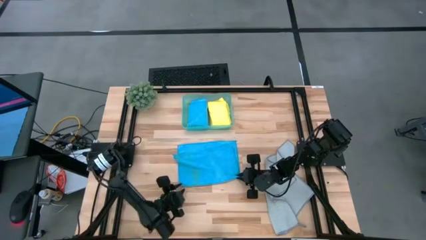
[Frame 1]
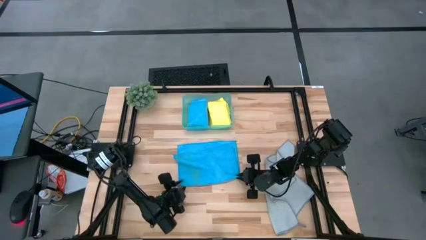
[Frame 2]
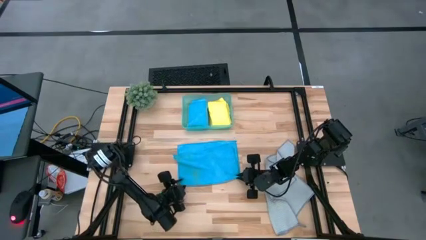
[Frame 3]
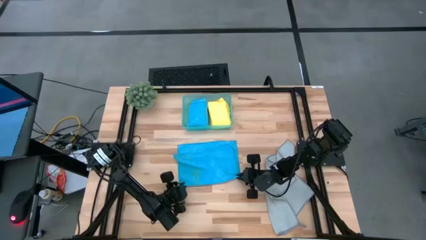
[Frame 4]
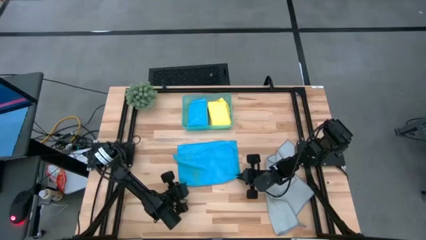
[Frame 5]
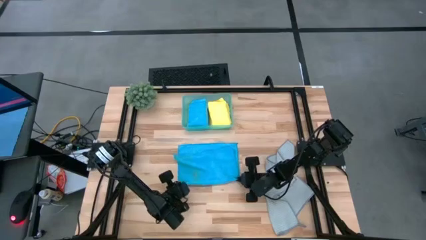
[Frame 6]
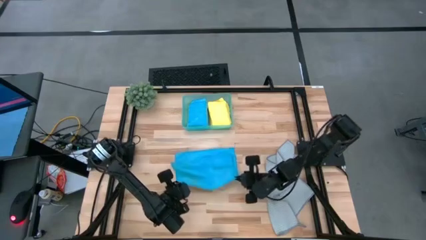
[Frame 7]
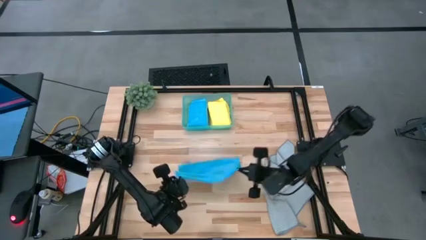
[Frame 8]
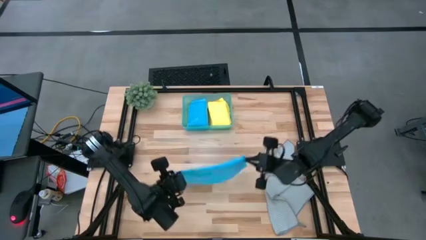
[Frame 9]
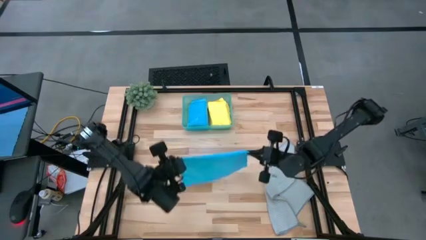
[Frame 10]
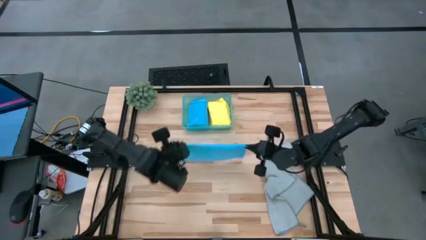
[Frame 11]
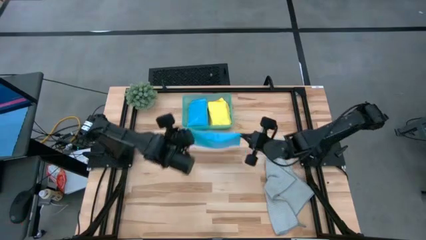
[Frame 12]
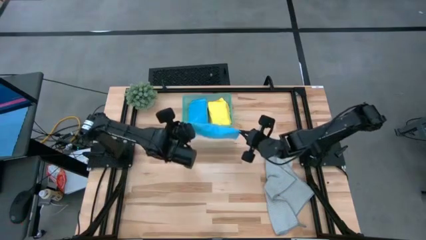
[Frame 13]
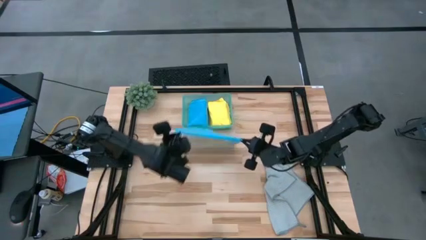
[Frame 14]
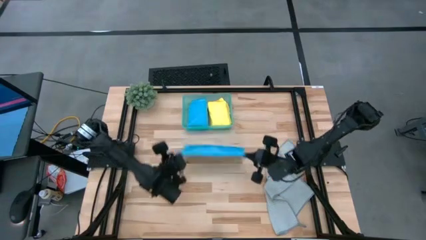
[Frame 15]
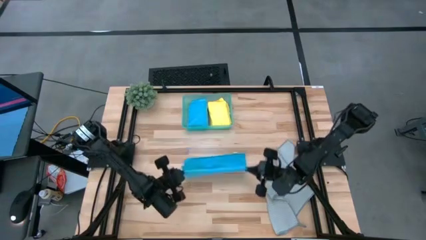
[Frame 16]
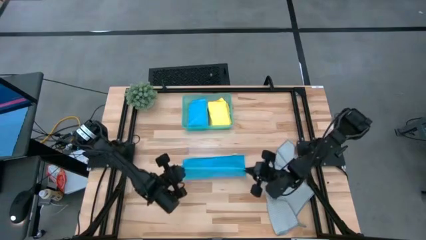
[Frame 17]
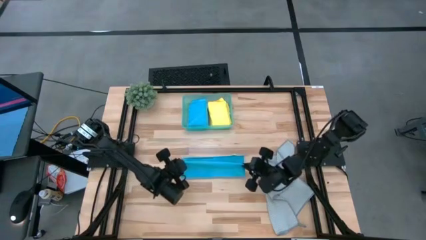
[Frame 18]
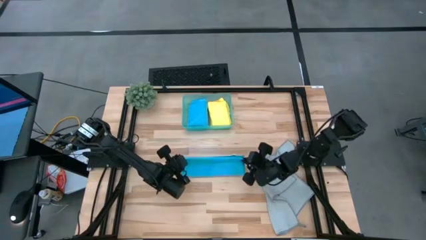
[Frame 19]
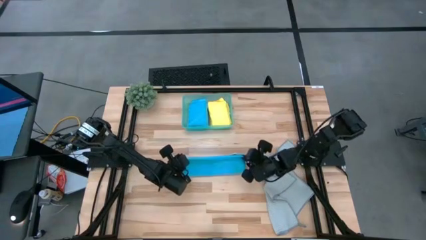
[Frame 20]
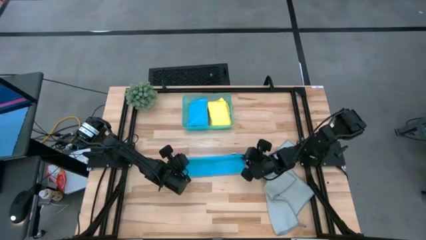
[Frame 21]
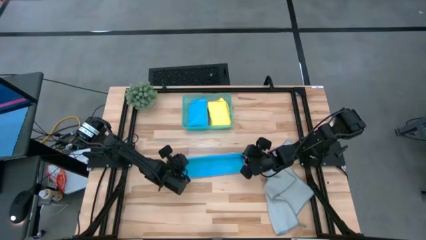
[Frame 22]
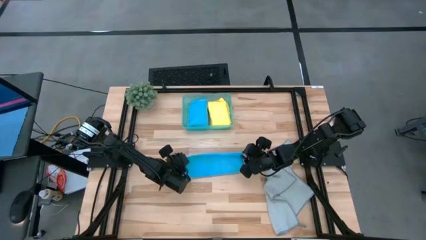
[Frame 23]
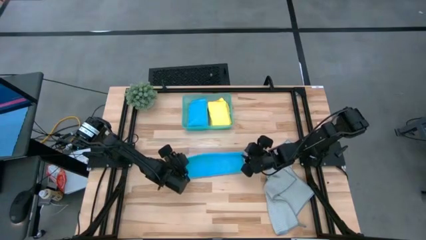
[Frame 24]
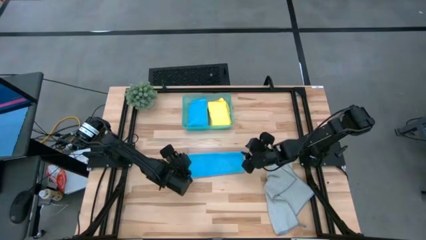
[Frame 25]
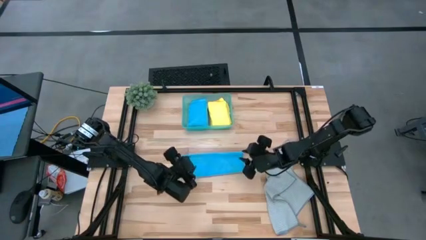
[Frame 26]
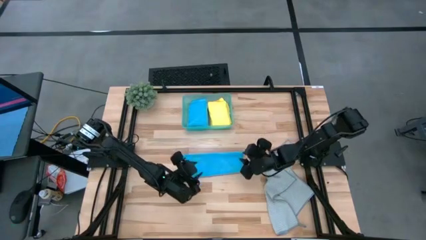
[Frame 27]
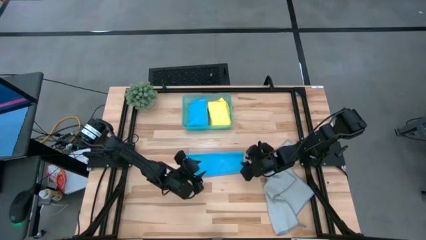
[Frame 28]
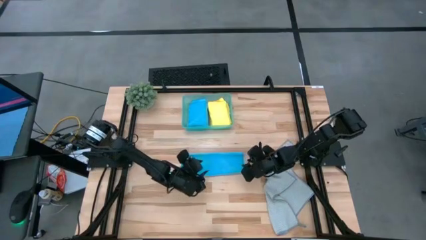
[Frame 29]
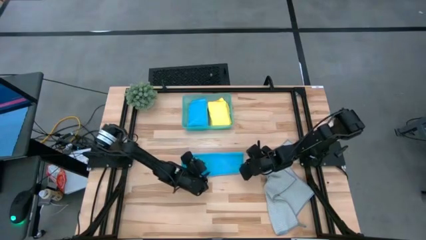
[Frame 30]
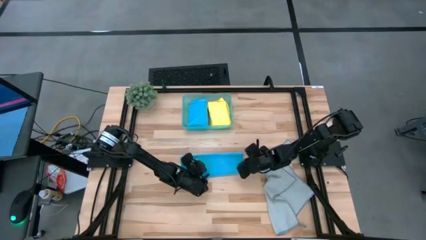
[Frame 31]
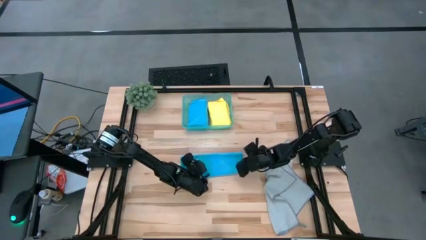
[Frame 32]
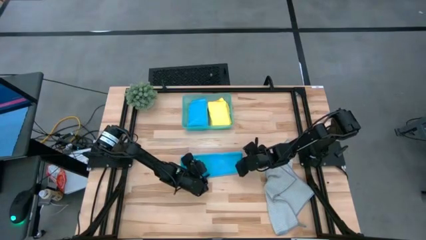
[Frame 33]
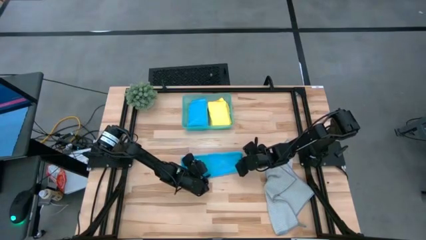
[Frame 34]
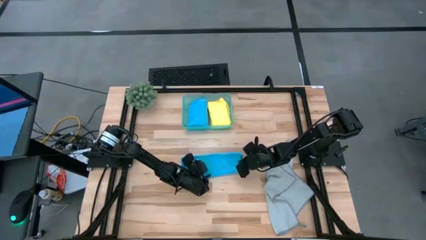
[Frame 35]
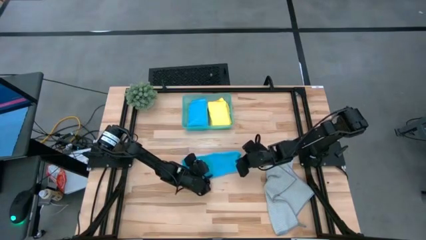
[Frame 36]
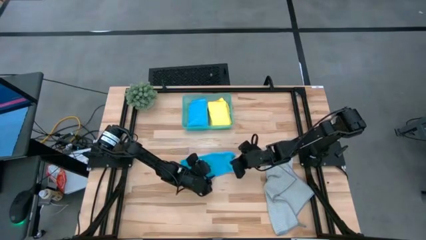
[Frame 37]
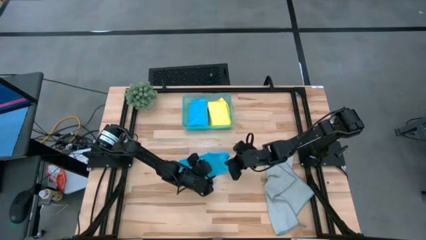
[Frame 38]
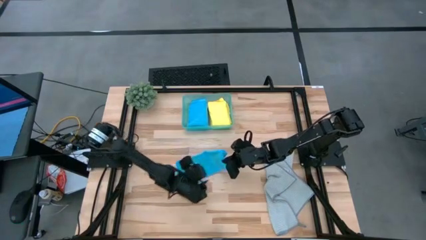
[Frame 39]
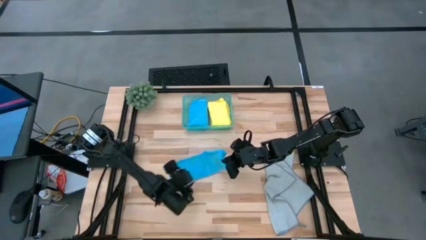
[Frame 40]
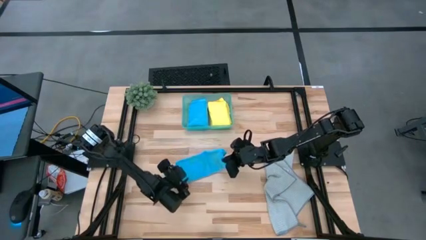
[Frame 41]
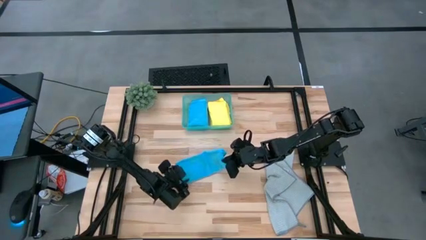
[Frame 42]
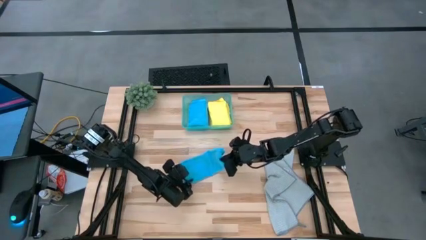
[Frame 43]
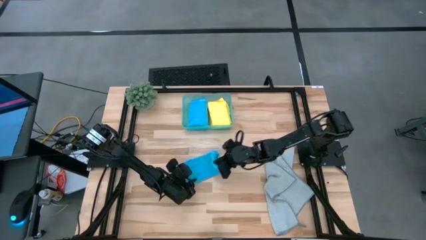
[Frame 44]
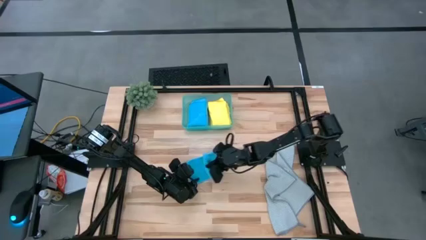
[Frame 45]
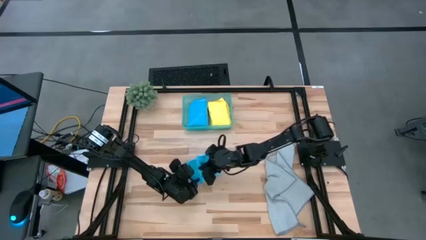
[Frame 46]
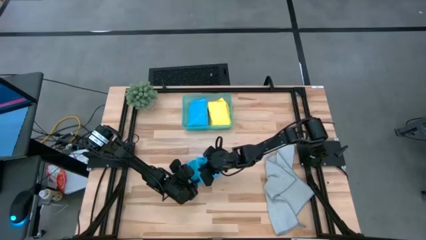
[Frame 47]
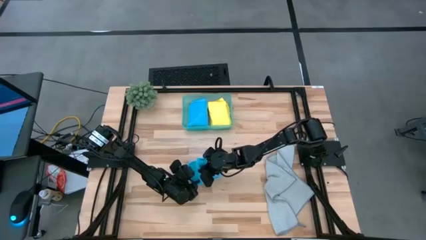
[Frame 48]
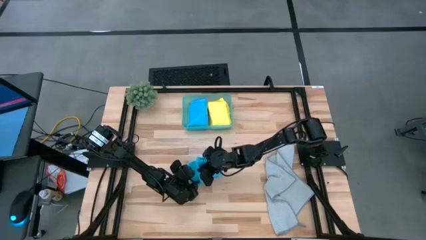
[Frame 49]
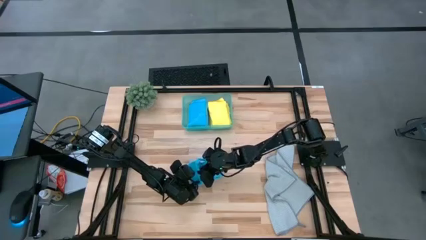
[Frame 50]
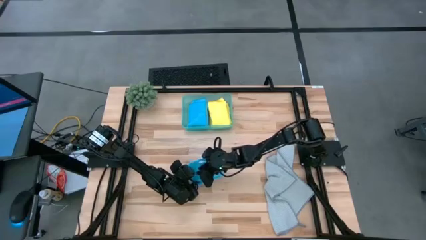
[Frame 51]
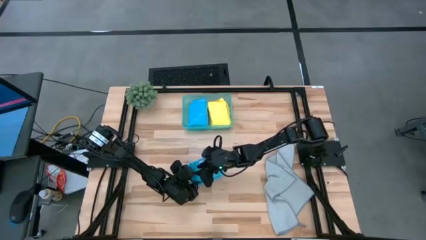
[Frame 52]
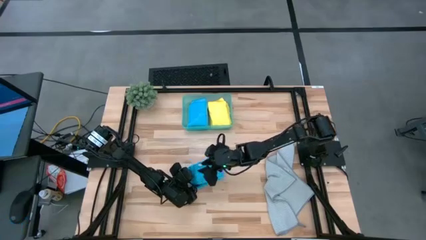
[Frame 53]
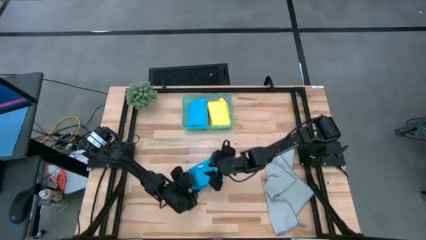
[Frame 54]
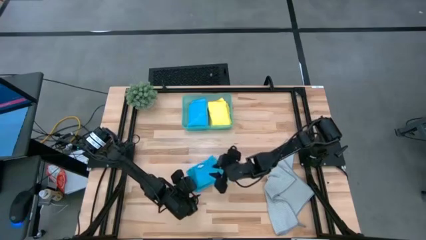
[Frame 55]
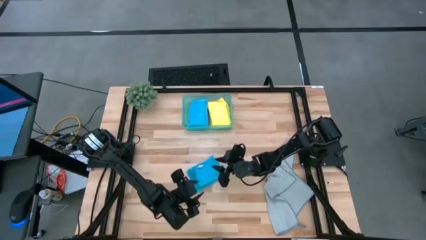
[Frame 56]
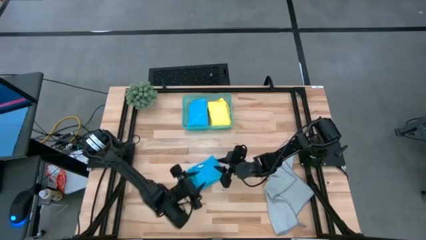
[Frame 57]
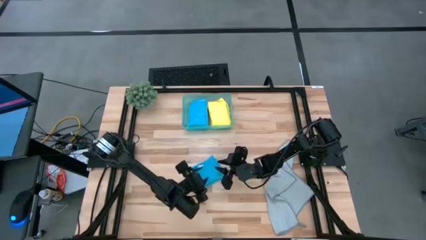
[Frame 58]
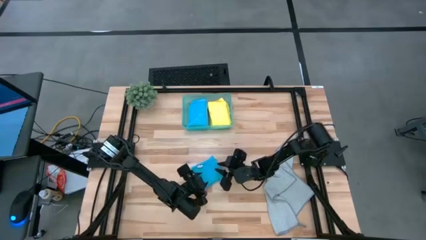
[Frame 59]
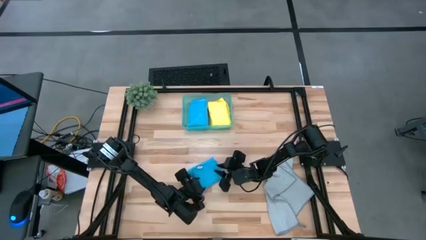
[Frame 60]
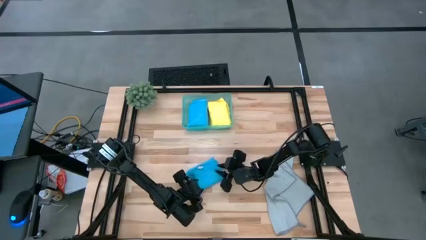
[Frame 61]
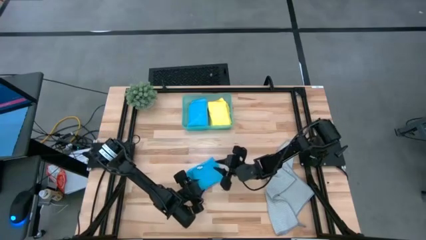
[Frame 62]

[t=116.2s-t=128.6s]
Task: Fold microfiber towels
Fold the blue microfiber towel

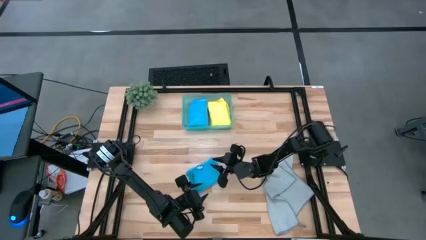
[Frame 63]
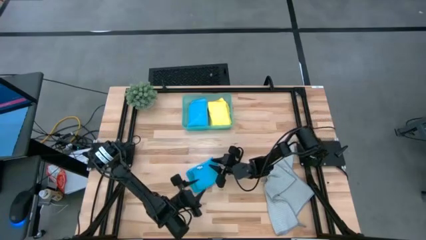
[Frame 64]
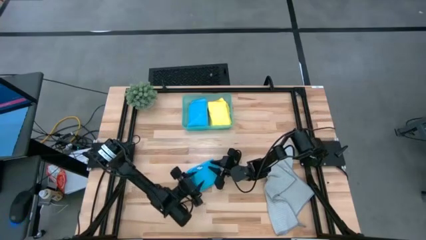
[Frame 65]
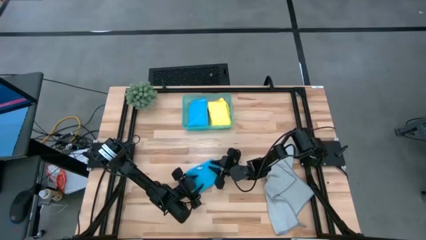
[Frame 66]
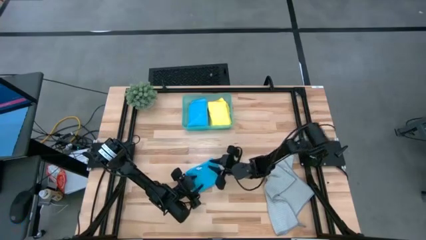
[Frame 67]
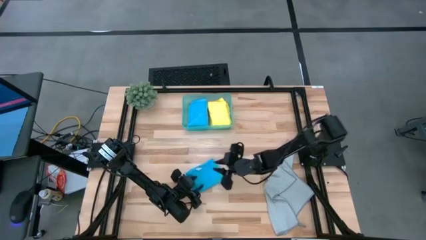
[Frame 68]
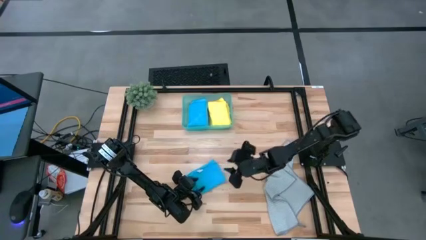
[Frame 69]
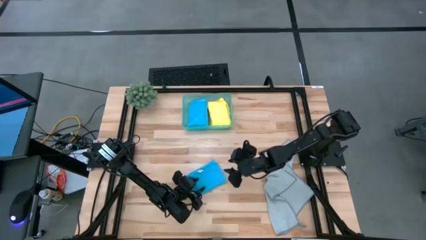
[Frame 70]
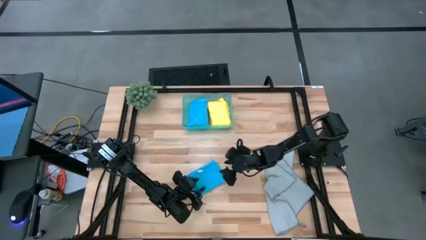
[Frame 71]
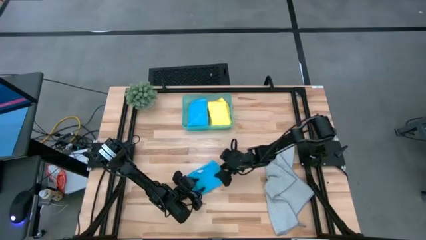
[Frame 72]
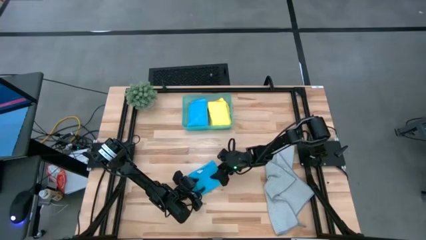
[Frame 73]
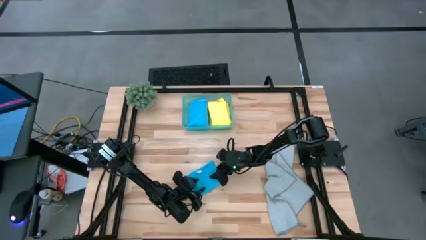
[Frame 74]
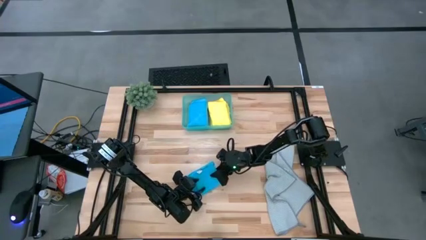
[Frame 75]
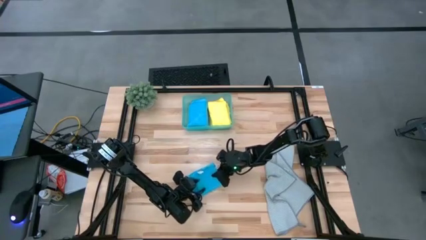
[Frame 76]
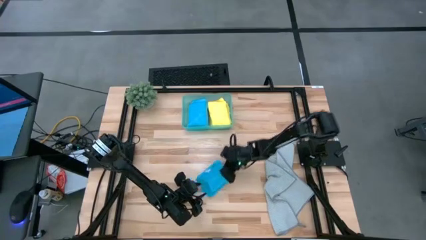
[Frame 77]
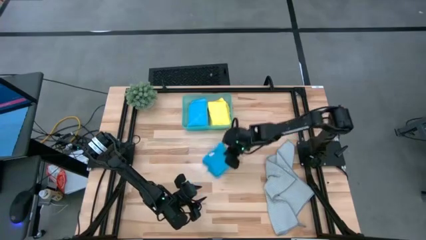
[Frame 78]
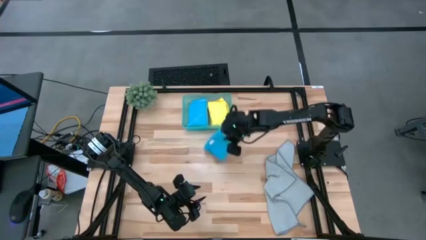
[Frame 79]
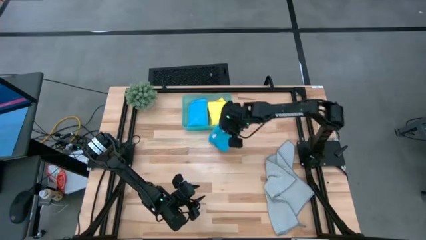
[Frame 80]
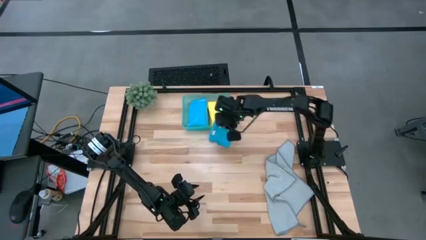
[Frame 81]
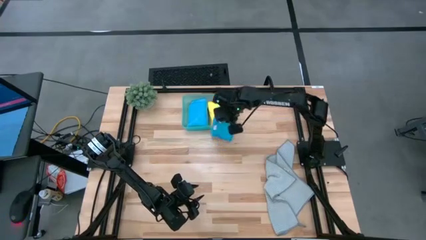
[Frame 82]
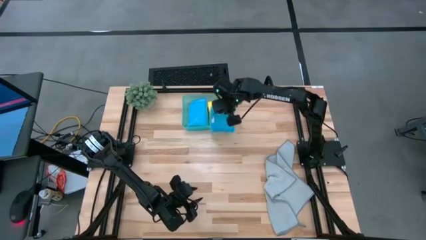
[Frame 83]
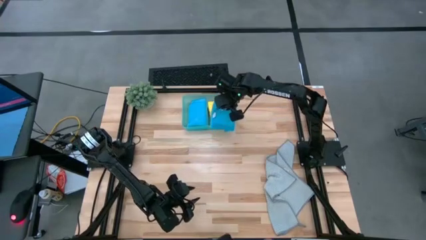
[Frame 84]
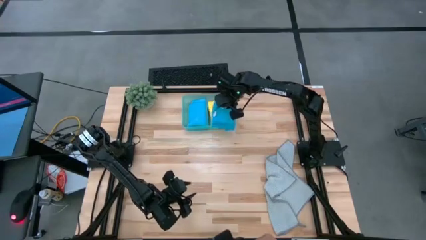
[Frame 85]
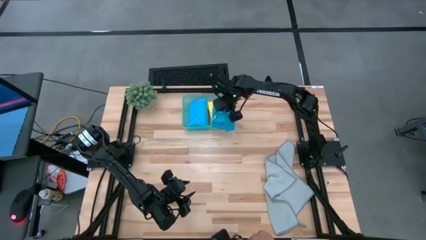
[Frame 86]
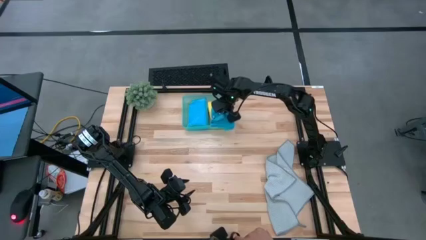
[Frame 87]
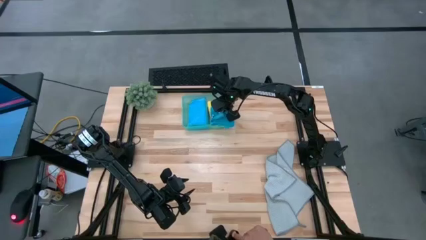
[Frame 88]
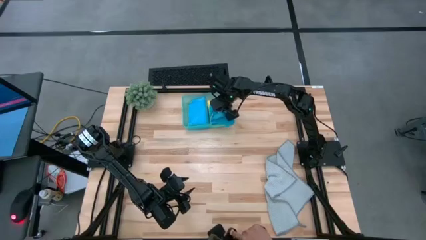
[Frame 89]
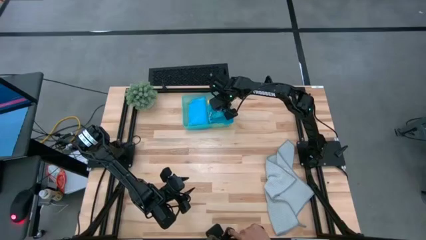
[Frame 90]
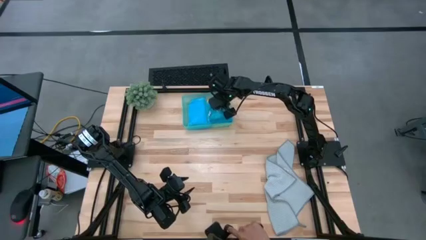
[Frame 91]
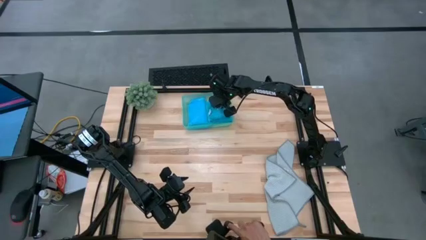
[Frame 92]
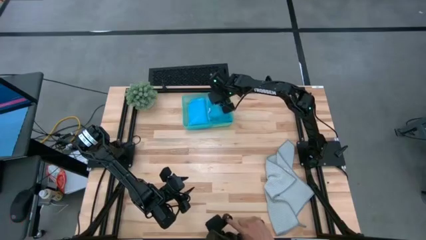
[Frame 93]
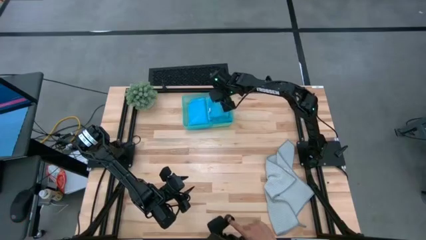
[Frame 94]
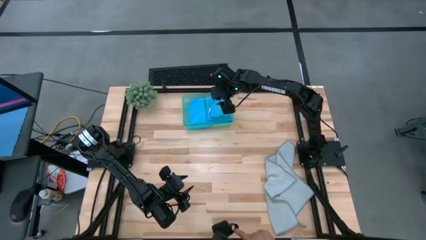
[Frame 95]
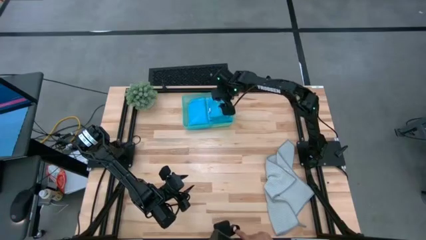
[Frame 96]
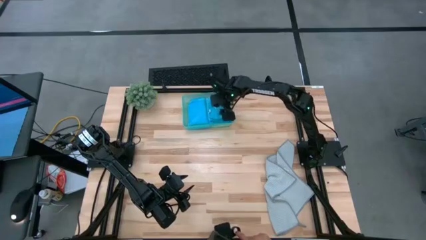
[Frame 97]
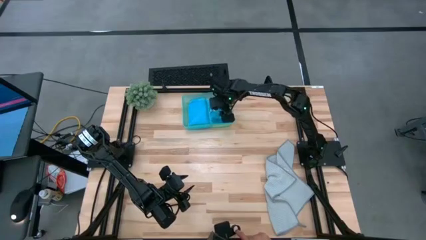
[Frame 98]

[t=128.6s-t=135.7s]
Put the blue microfiber towel into the bin
